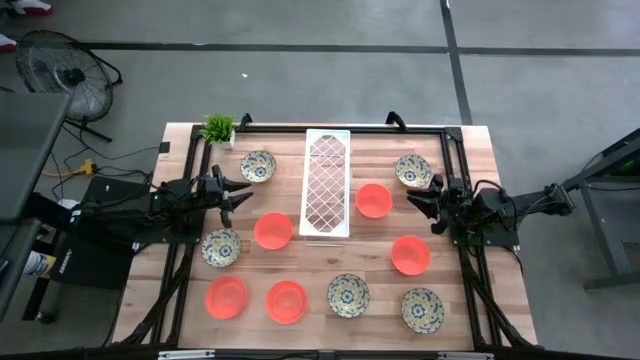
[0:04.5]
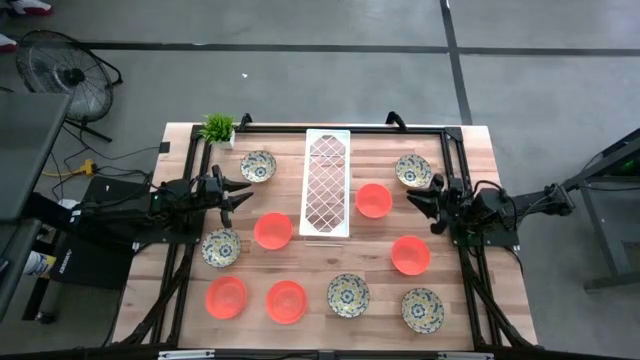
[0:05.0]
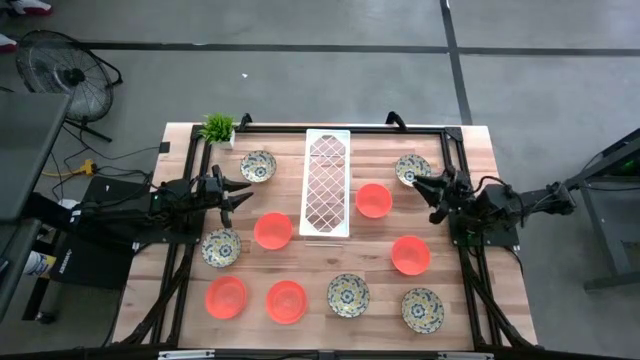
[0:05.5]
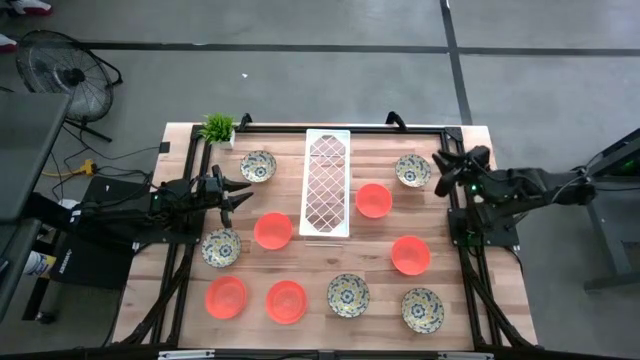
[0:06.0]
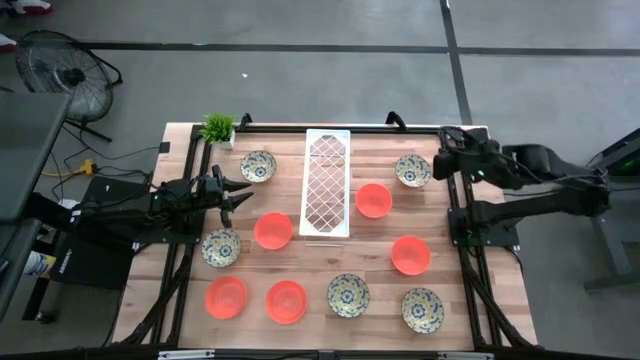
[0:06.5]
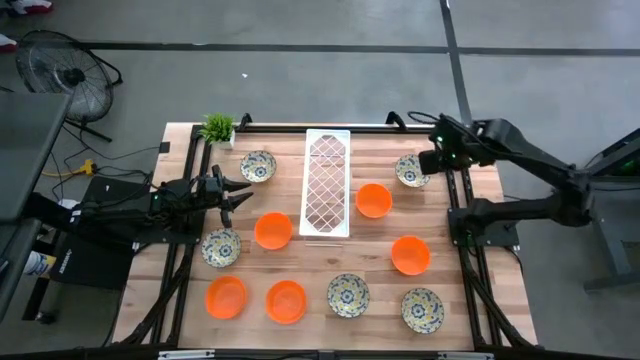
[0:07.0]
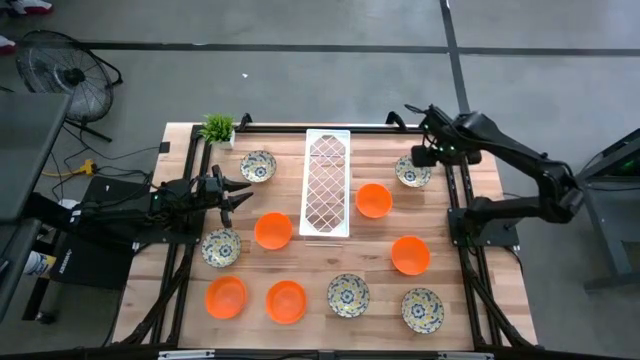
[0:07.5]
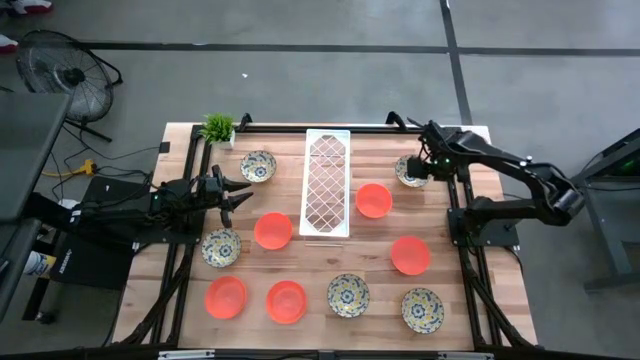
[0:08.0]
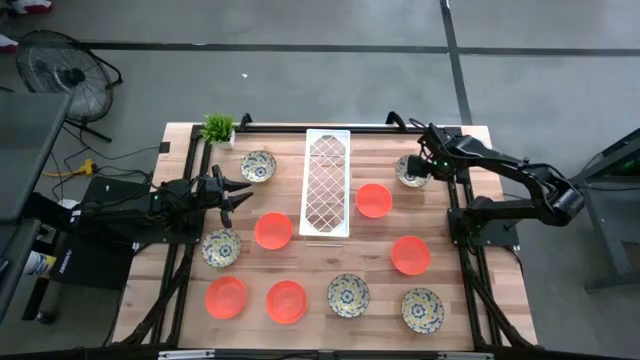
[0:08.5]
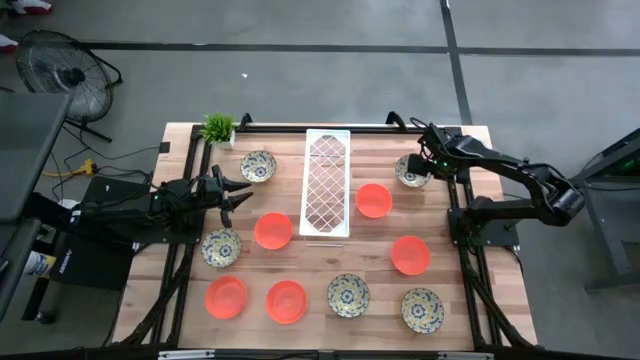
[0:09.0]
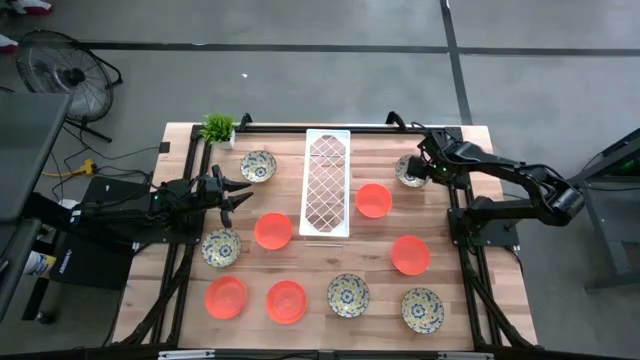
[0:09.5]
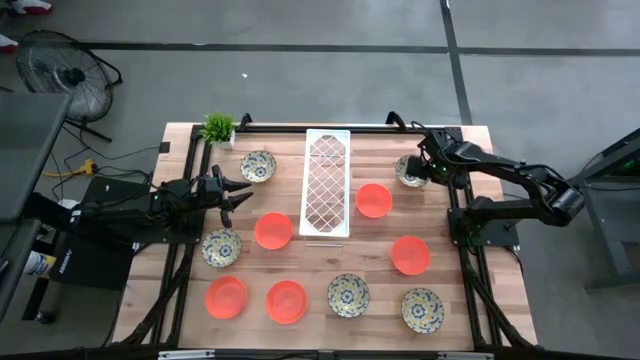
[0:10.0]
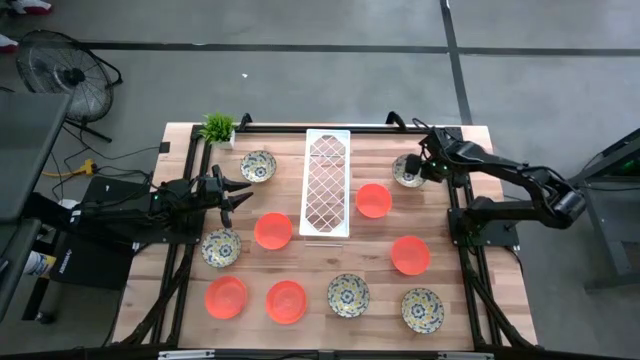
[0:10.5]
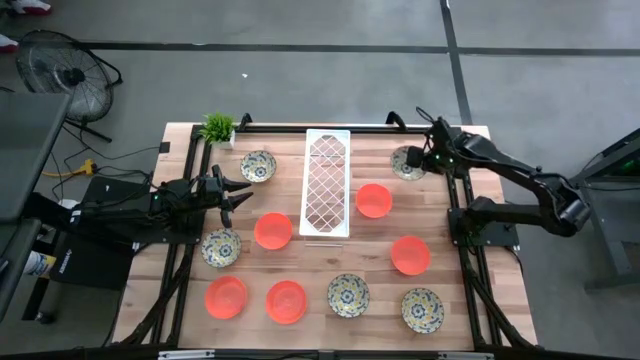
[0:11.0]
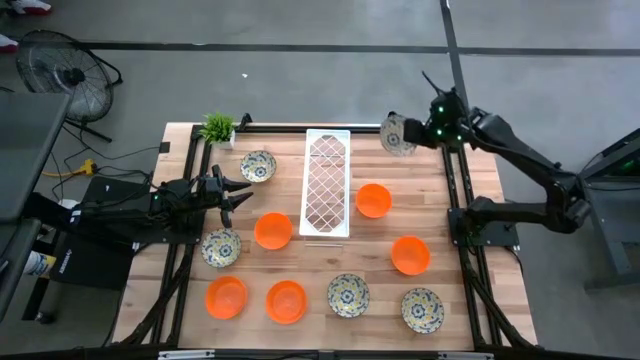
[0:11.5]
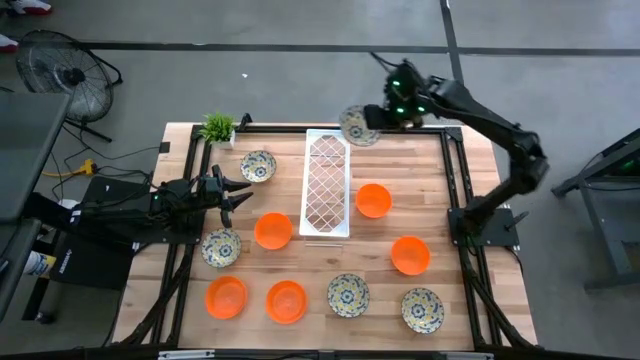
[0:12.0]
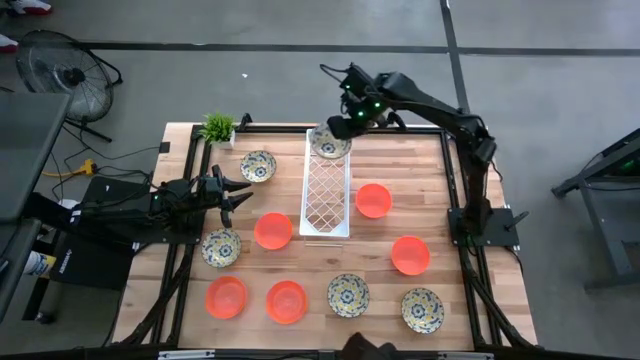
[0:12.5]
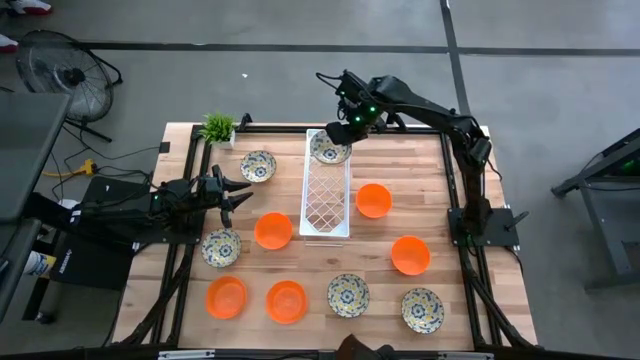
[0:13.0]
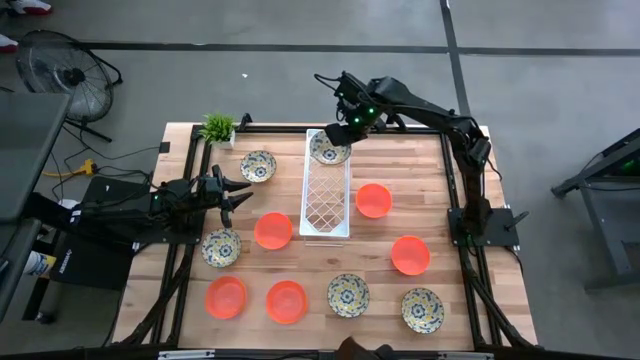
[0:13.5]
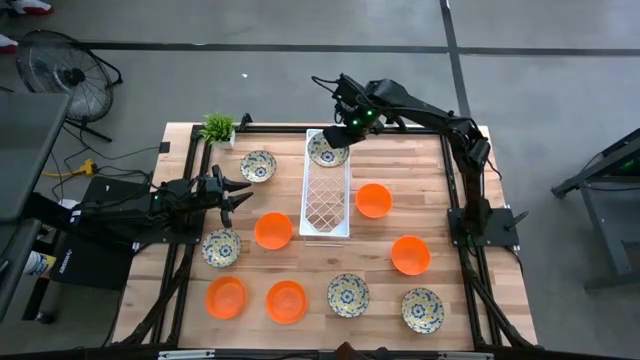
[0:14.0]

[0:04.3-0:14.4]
Task: Pick & Place Mini bowls
Put the yellow bowl on the shelf

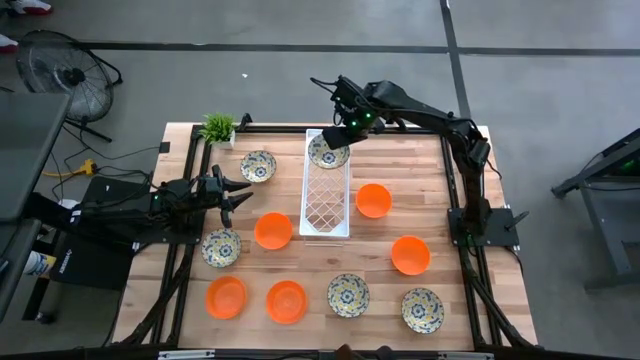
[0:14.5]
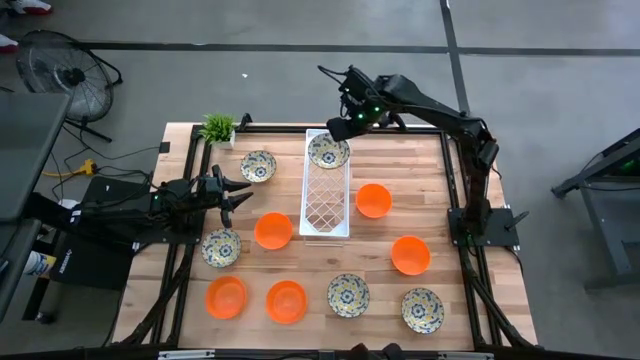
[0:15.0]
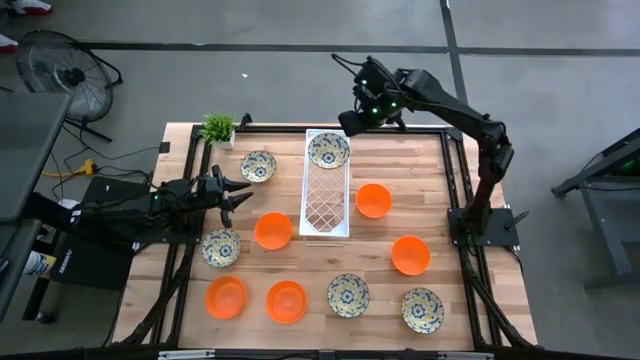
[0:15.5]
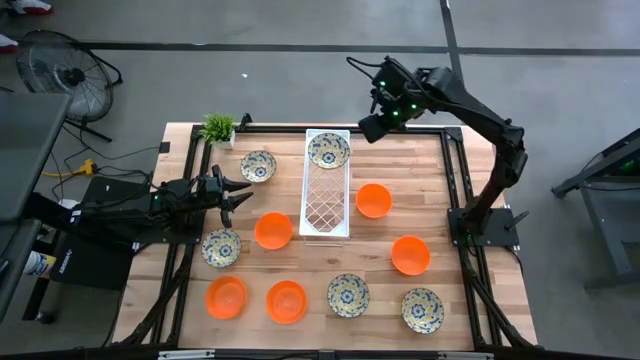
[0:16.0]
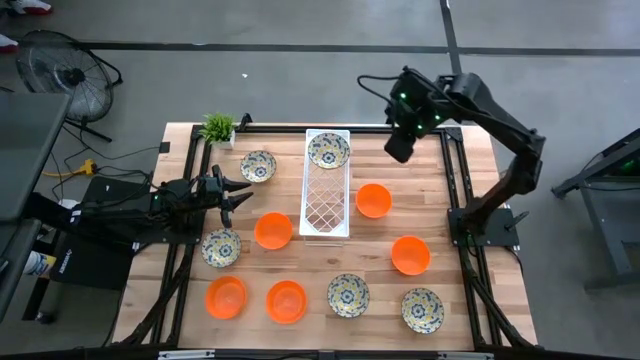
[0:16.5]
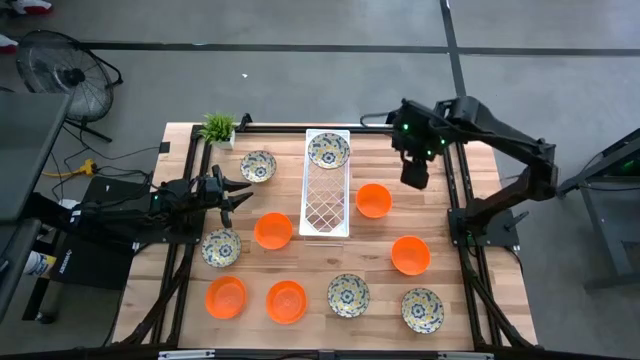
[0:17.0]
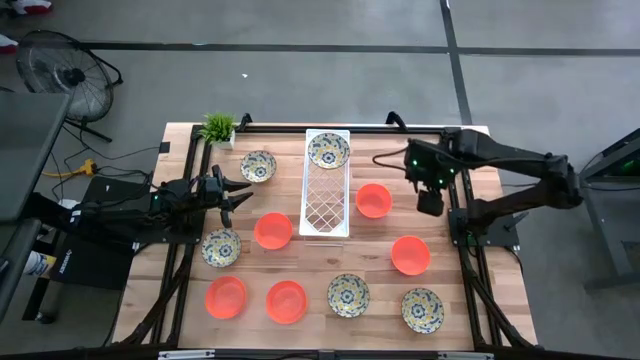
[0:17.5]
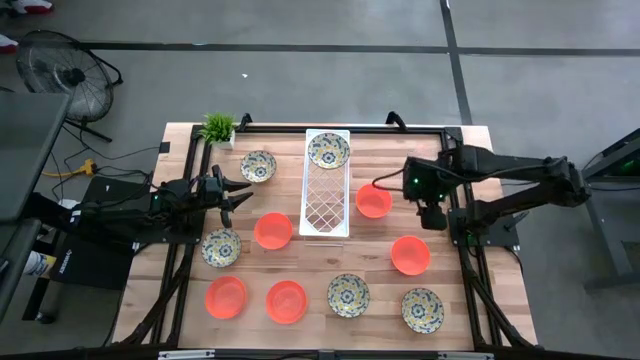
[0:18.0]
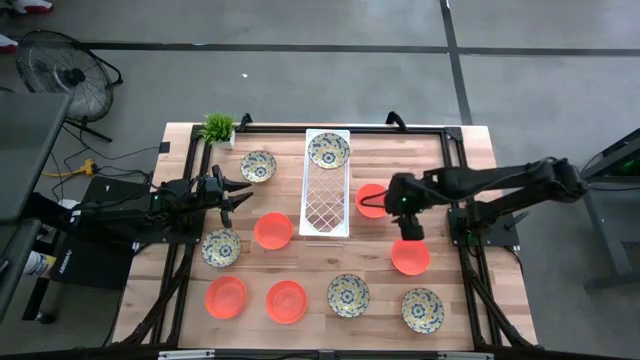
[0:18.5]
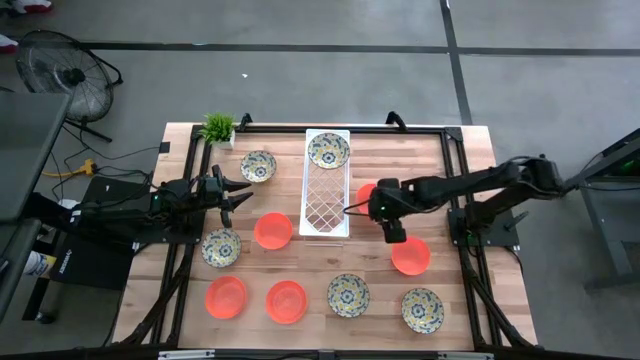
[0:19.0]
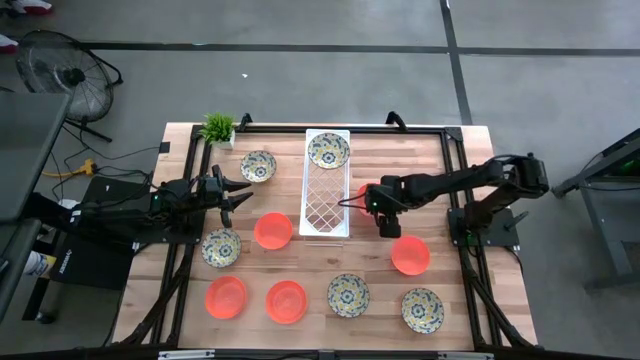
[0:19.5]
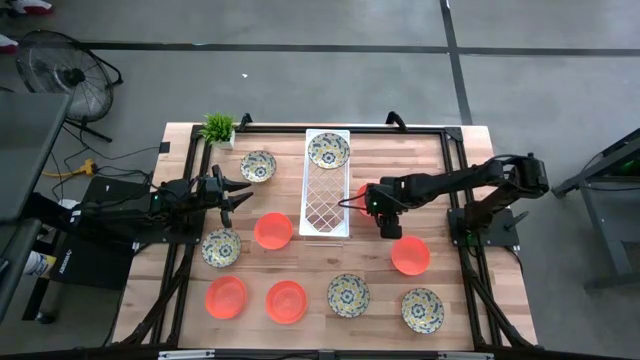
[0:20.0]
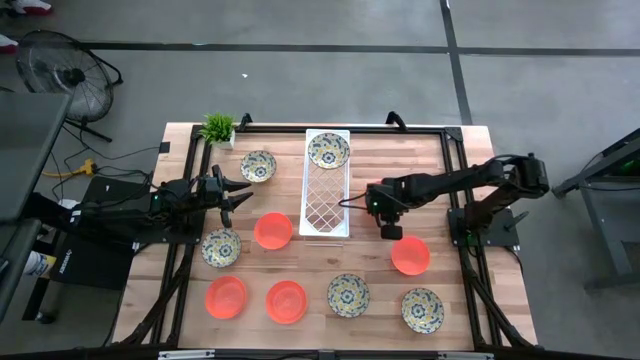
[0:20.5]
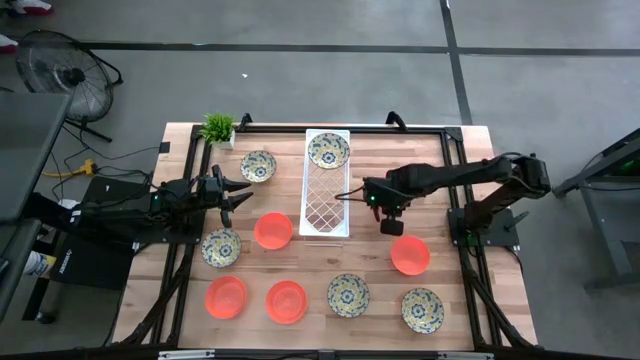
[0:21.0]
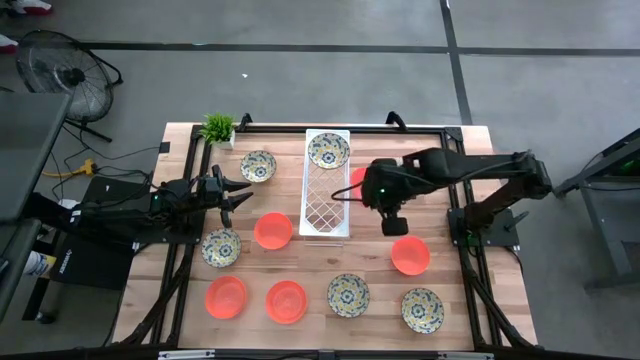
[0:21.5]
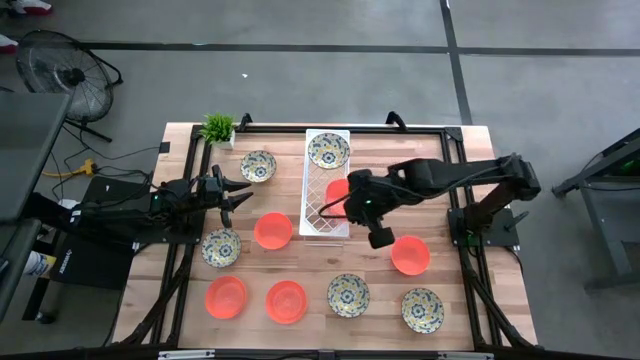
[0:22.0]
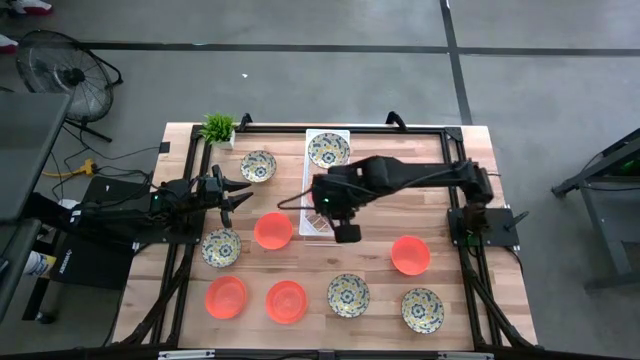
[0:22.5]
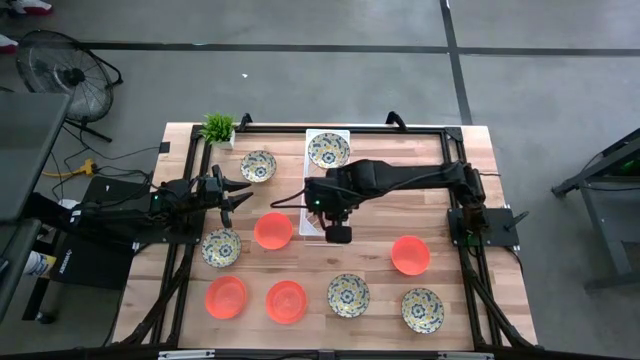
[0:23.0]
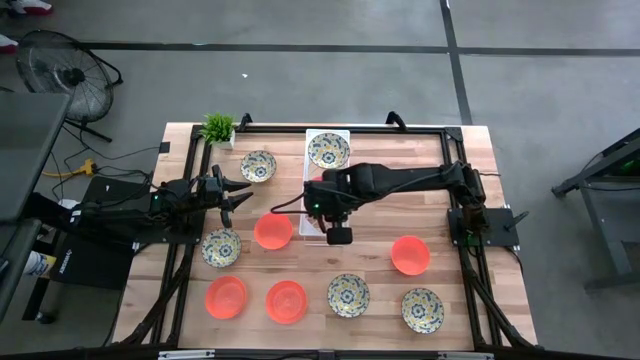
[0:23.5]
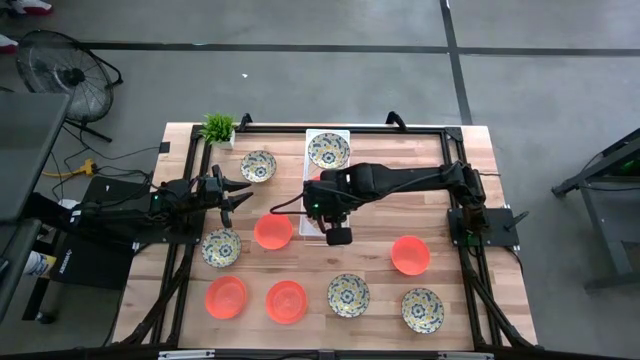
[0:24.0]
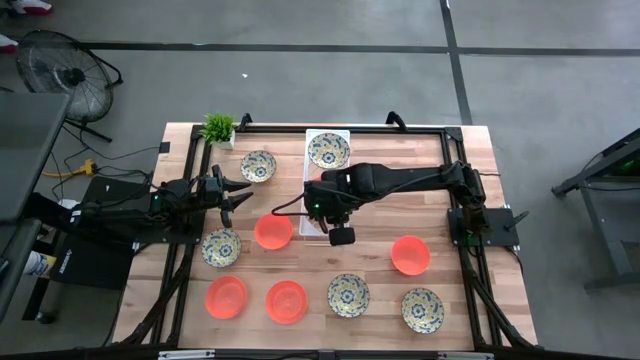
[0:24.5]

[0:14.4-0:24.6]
Put the orange bowl on the shelf
